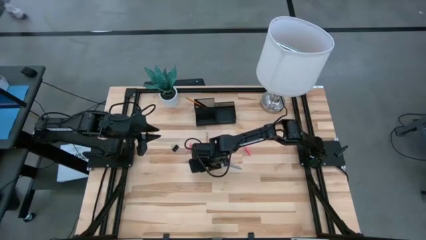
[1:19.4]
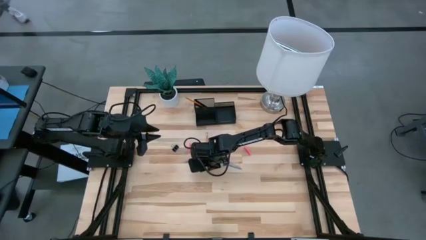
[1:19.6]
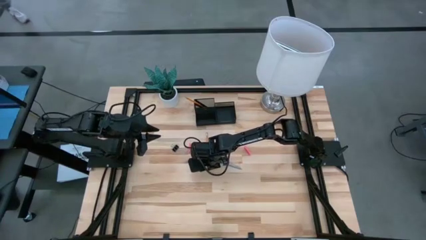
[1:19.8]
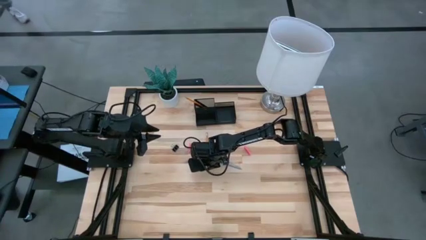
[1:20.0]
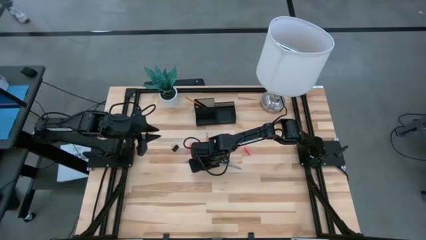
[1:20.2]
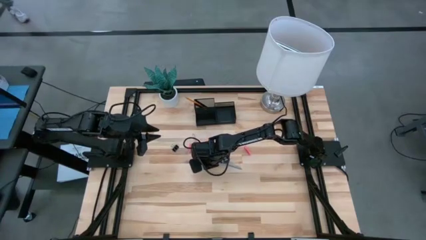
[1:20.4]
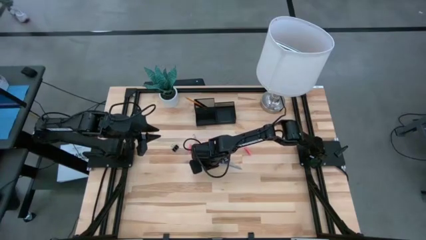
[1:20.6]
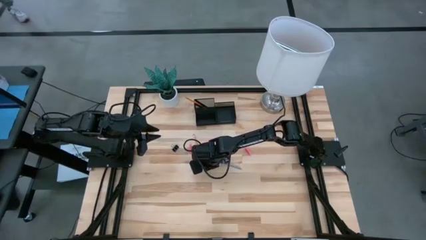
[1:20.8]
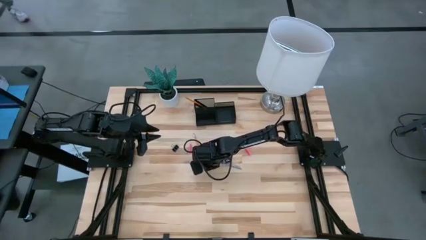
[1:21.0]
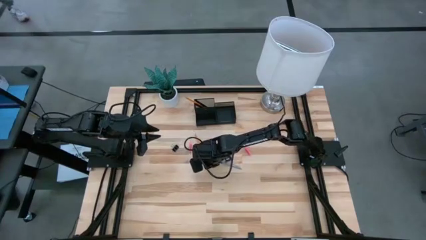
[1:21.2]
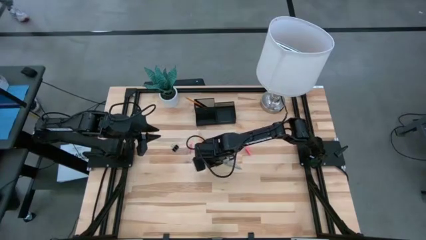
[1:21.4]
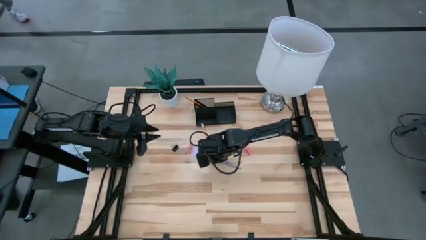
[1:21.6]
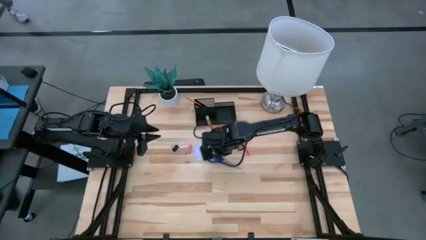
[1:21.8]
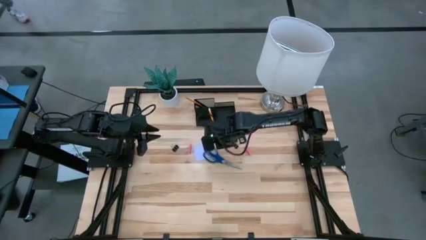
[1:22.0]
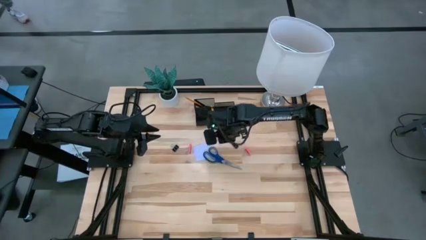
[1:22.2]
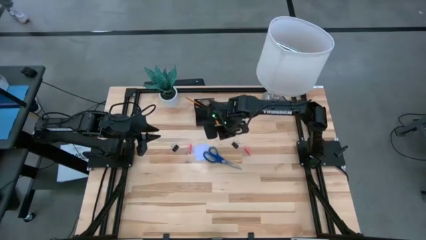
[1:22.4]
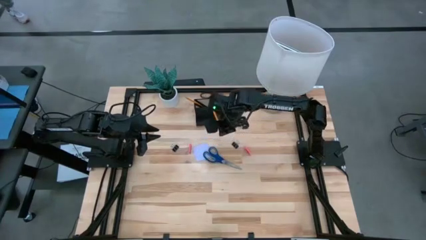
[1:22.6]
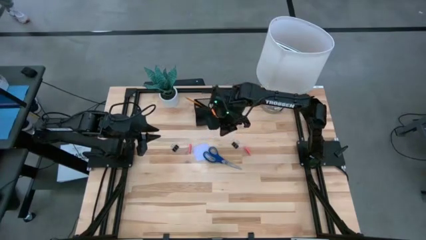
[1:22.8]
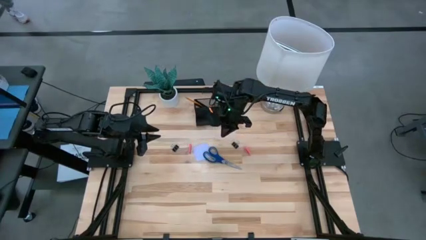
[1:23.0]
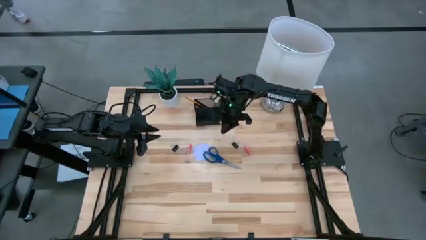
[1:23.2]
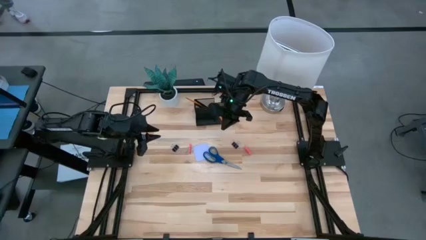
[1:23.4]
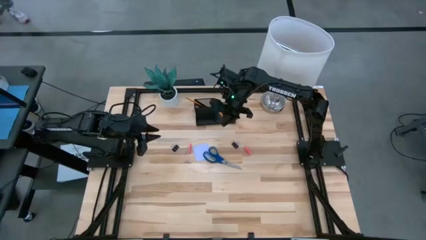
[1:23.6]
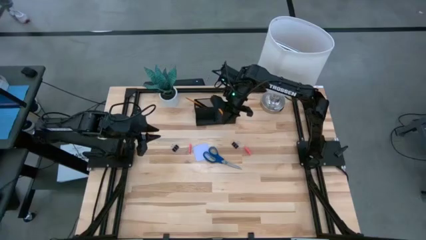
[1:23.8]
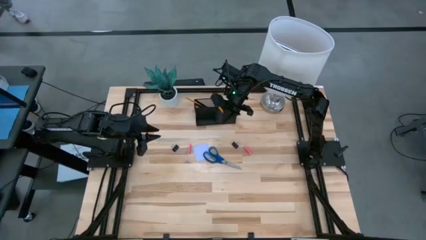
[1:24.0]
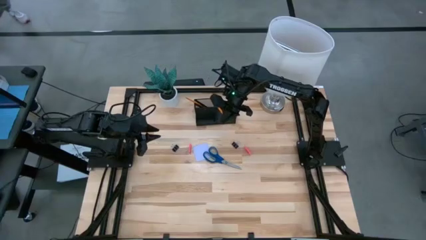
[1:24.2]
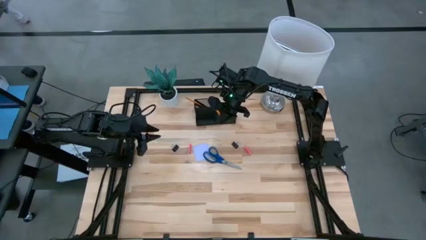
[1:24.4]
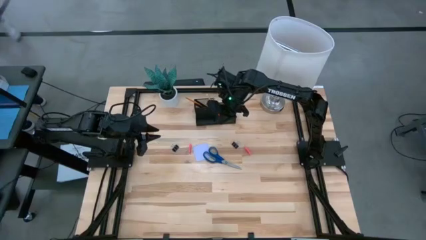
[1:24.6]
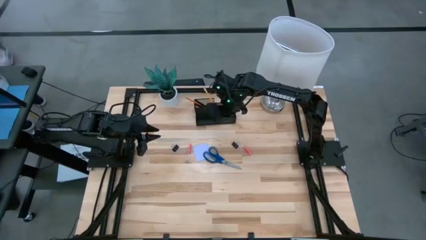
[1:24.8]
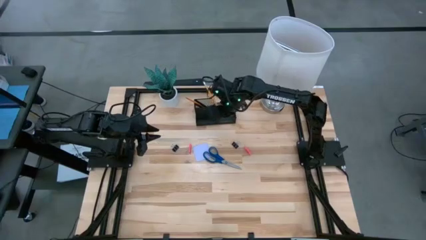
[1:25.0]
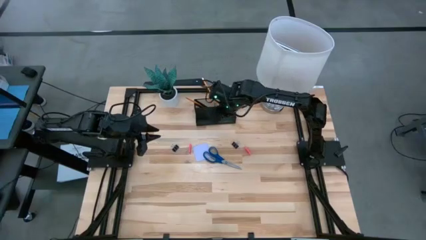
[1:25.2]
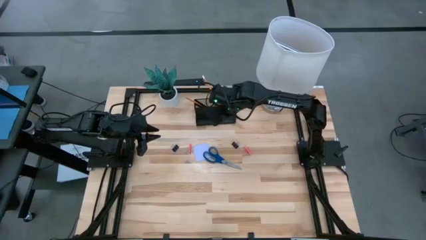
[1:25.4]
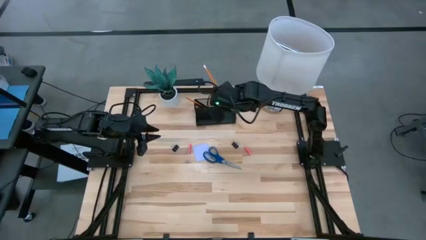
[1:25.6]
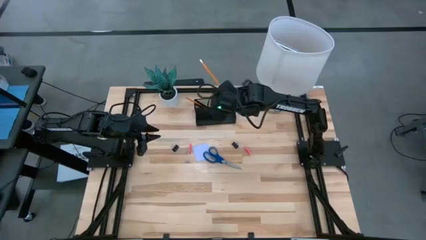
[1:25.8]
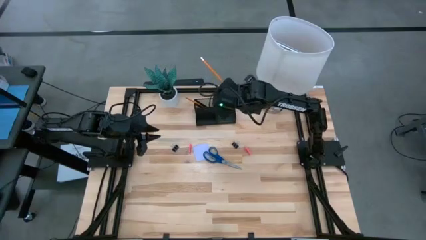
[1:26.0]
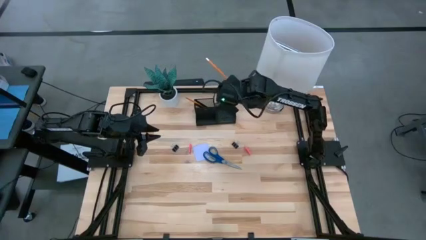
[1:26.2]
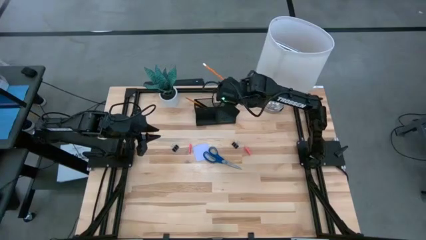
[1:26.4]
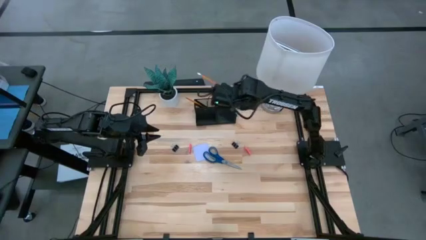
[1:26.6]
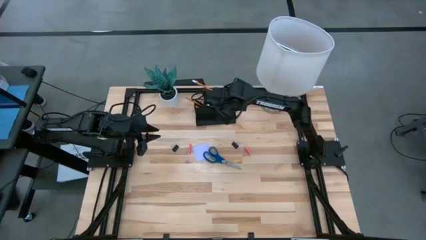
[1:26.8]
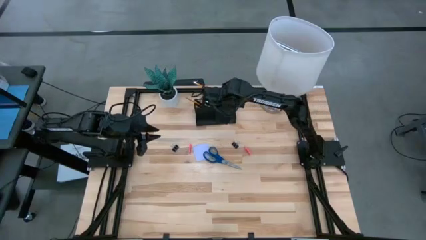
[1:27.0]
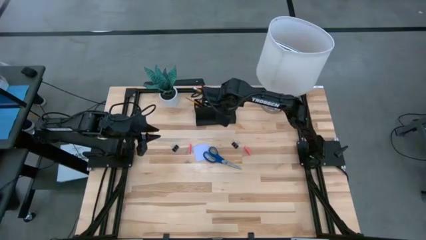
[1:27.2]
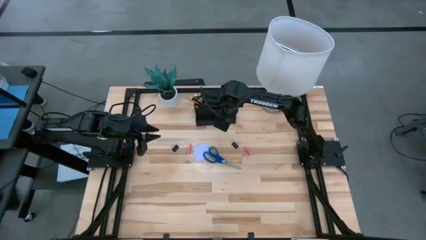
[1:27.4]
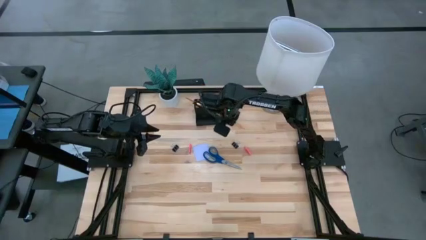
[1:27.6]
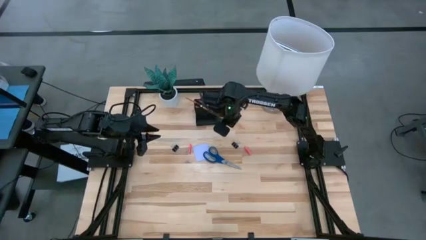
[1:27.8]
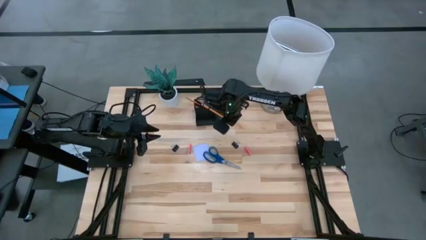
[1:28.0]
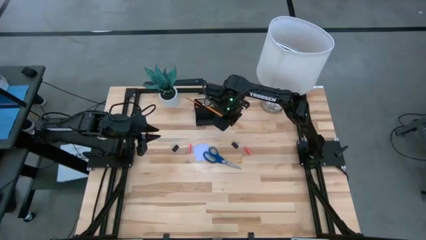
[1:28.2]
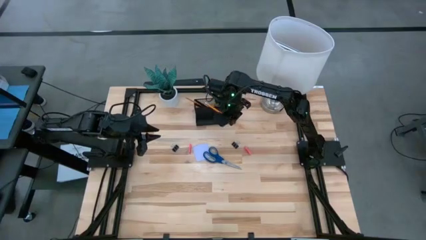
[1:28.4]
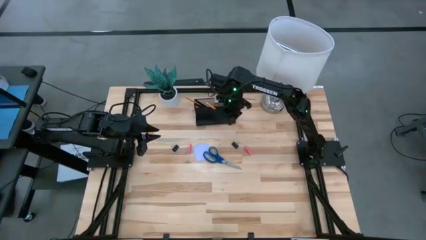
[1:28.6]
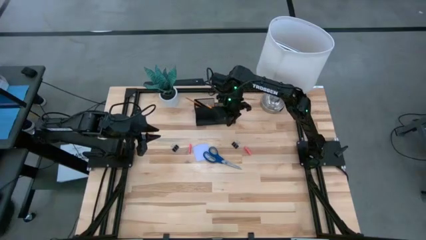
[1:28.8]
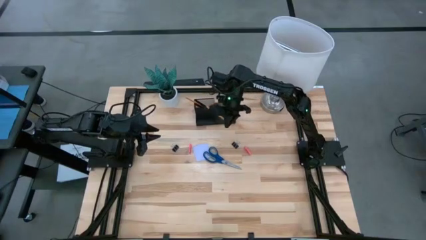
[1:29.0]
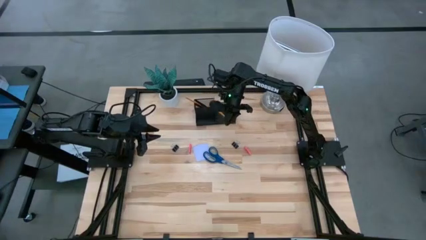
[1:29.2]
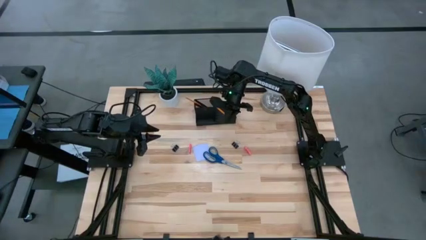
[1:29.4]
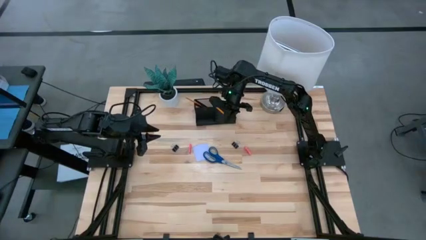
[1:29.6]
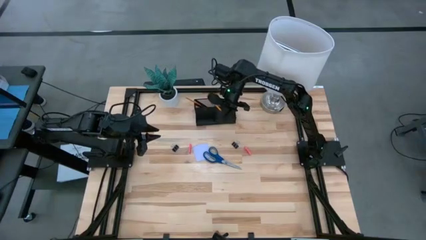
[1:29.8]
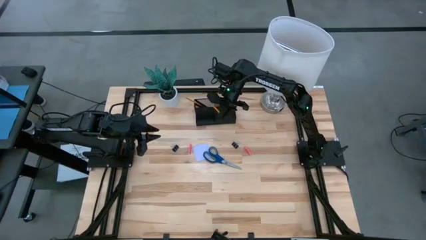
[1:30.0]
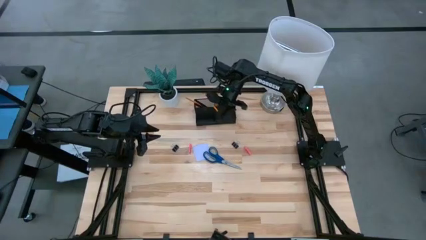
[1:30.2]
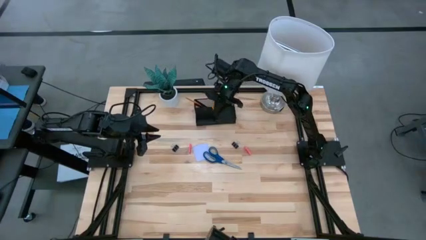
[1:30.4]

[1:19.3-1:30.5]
Task: Pick and place office supplies into organizer
Put the pencil into the desk organizer
